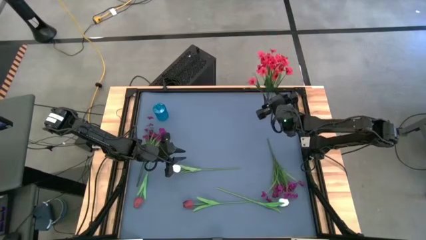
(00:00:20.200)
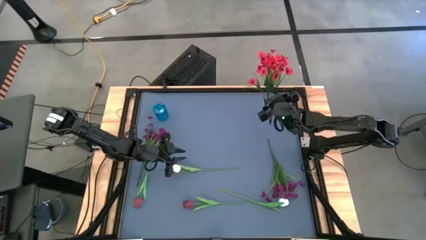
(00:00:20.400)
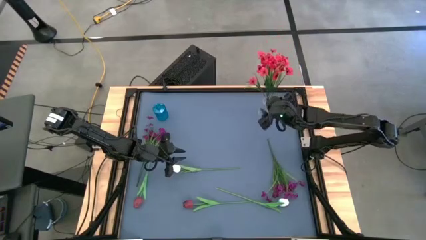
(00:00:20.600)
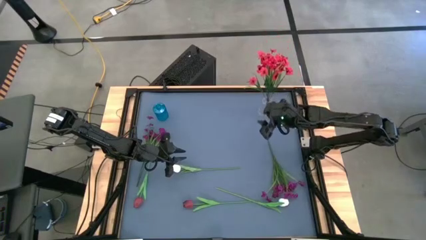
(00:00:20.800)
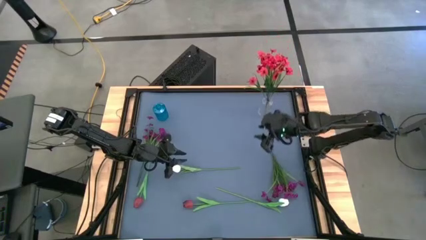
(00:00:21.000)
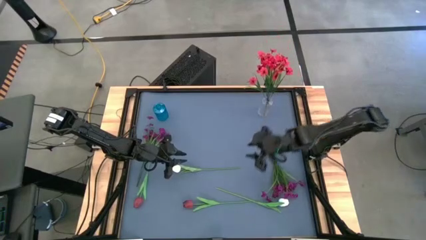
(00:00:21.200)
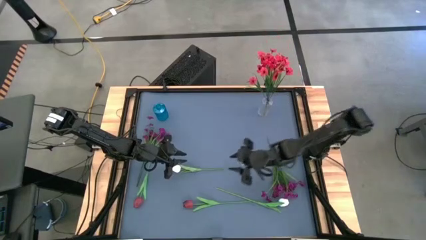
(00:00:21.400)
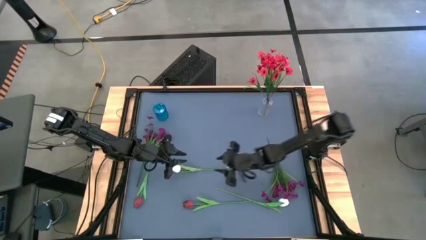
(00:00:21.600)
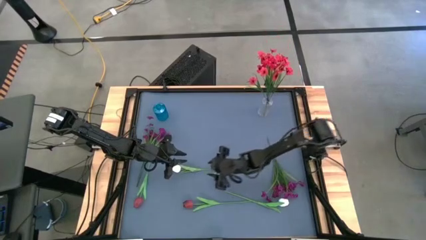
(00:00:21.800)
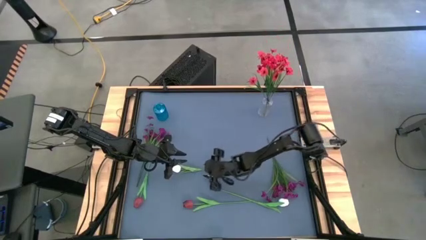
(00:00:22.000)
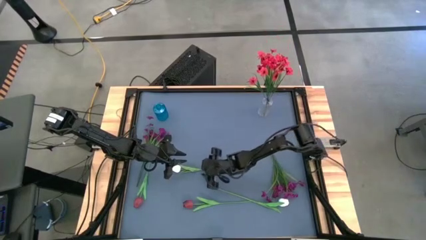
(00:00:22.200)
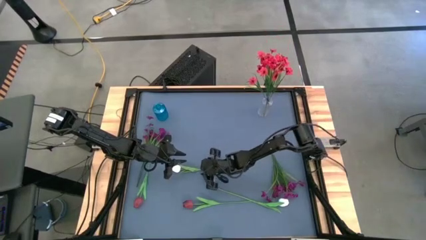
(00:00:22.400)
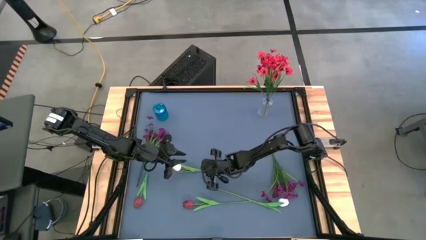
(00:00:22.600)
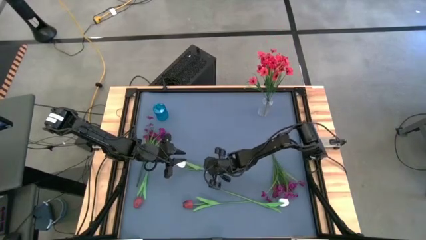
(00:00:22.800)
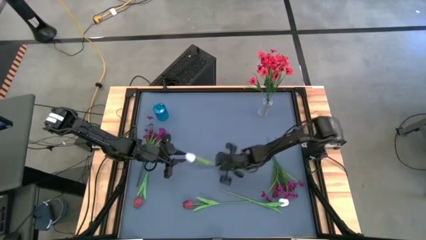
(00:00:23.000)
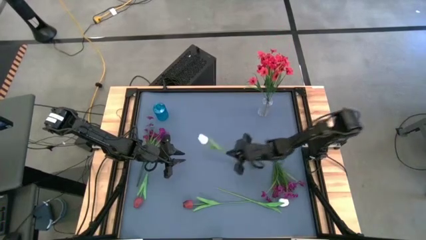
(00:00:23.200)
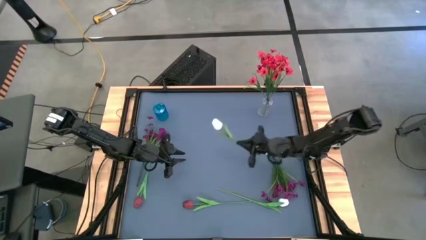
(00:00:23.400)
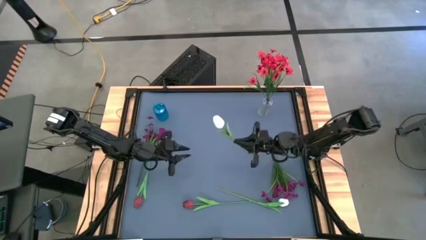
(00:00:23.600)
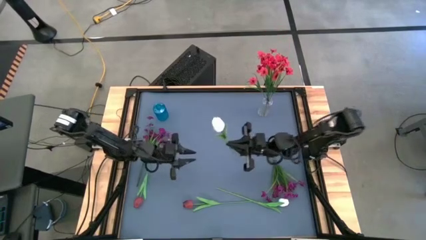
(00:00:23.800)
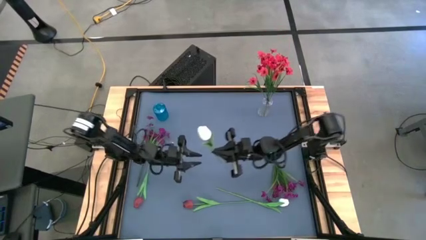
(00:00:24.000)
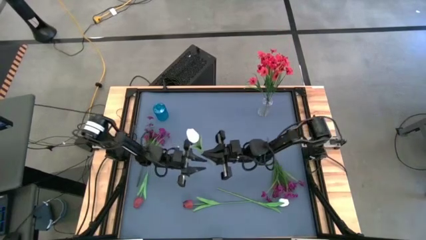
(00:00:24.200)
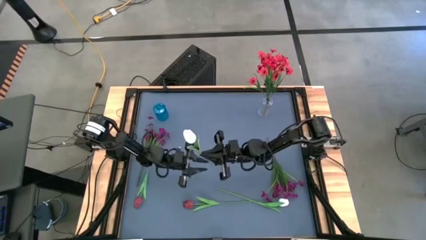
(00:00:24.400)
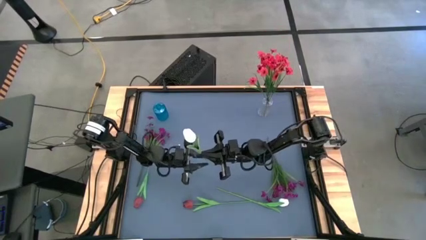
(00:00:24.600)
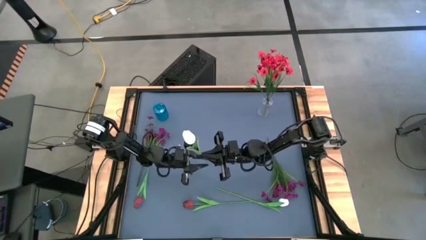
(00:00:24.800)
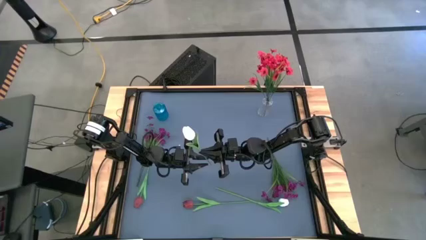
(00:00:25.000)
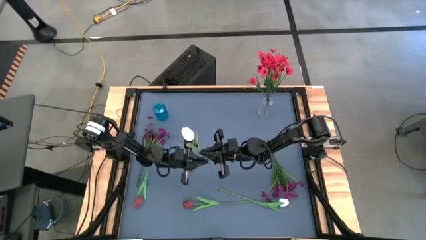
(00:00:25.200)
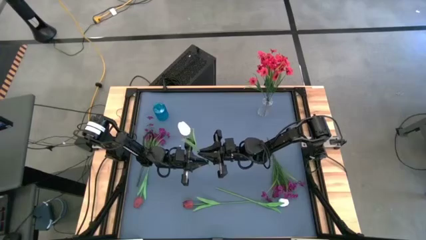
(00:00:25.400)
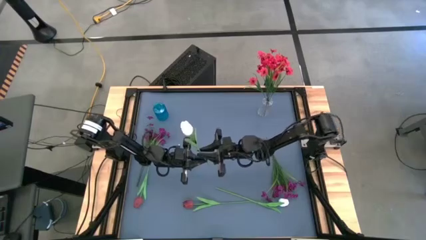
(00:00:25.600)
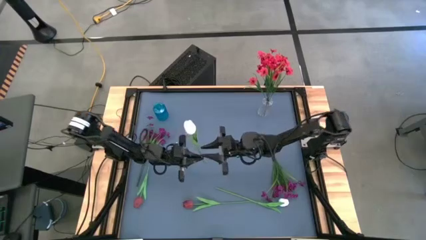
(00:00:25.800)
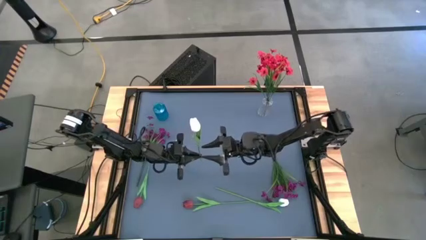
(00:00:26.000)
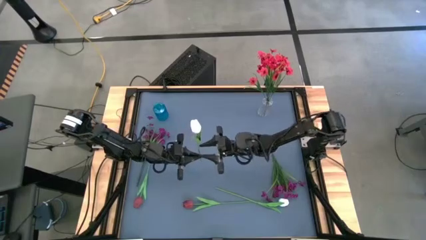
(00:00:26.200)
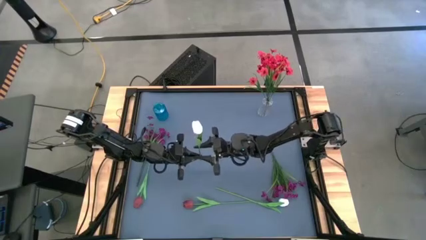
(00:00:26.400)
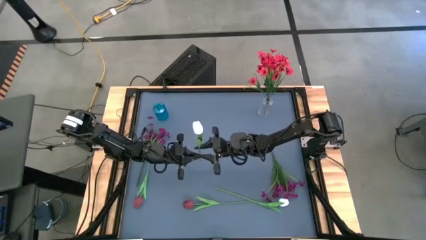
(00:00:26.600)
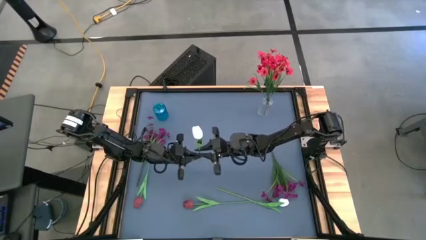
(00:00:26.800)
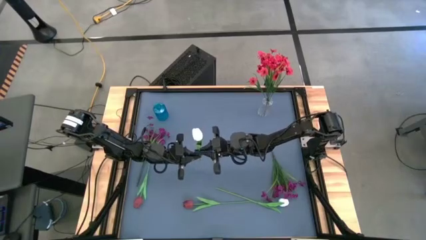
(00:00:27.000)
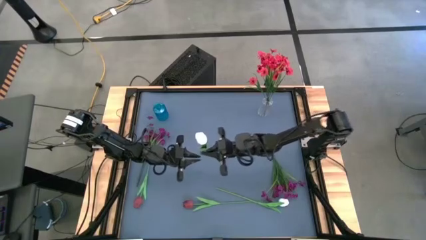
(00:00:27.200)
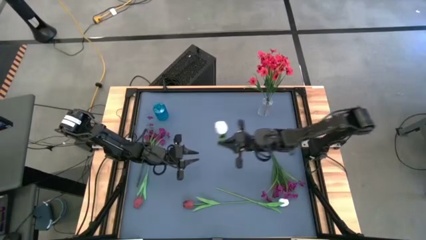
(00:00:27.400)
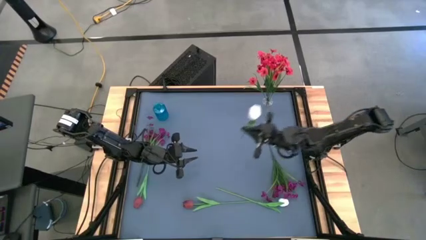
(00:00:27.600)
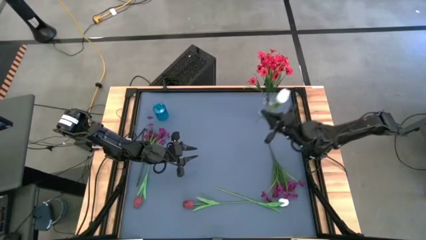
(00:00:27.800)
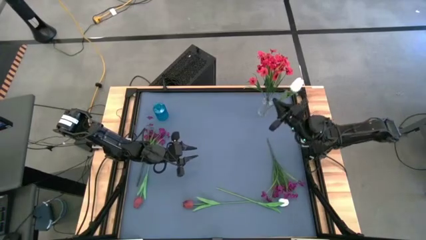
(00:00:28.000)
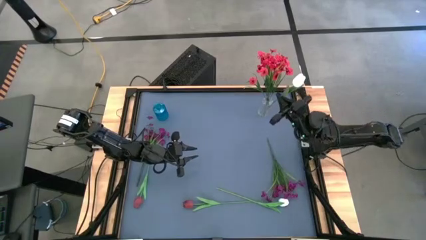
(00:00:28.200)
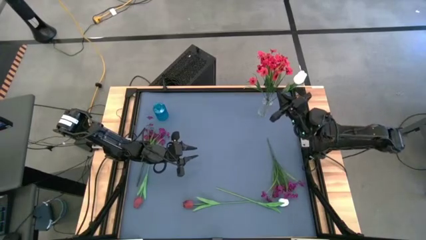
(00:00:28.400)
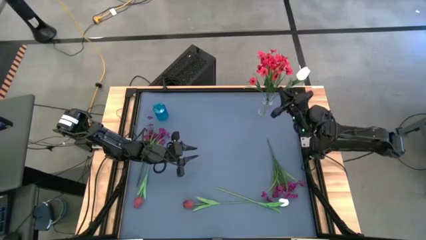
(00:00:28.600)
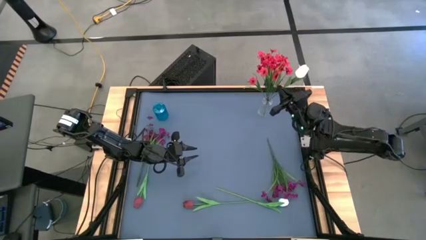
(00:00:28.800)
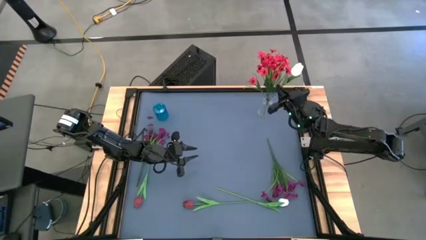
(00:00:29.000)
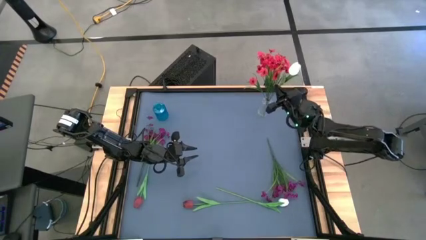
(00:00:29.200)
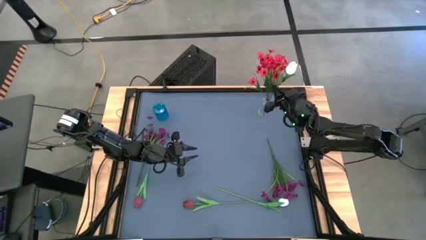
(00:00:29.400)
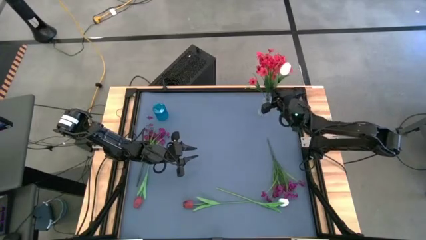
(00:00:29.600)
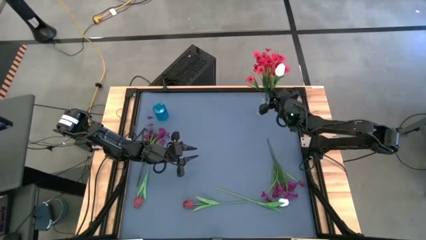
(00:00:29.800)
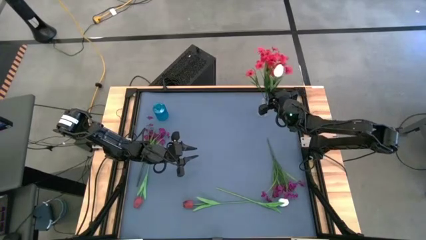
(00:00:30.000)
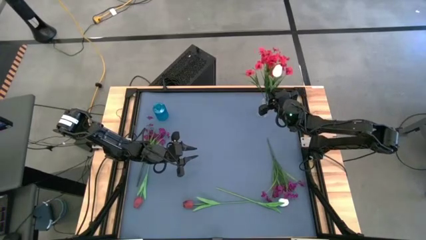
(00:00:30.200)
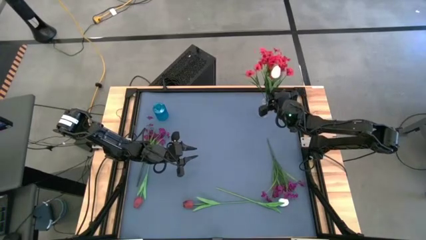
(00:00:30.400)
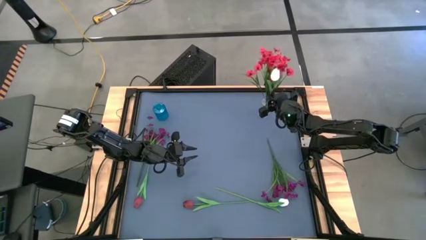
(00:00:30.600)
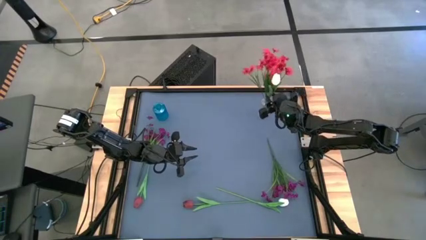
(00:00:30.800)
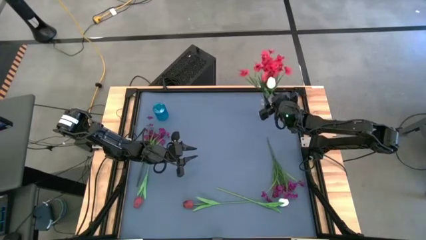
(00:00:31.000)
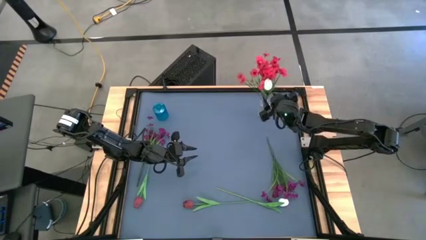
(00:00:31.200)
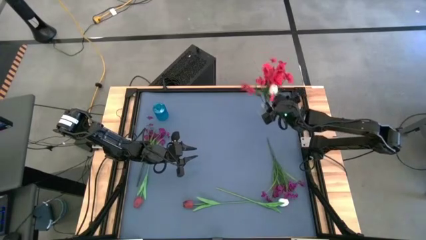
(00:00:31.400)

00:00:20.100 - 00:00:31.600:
Task: Sort flowers into vase by color
Put the top white tulip into the transparent vase

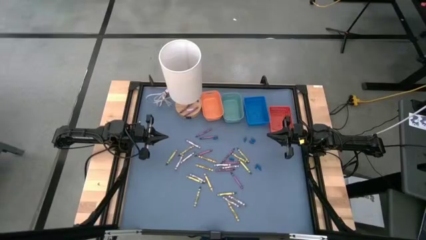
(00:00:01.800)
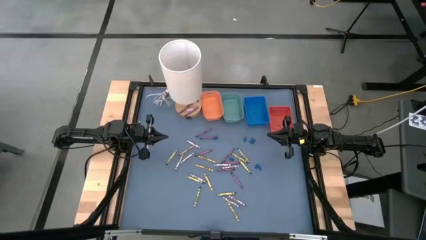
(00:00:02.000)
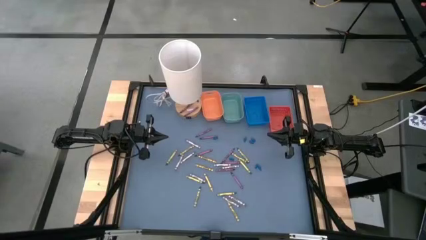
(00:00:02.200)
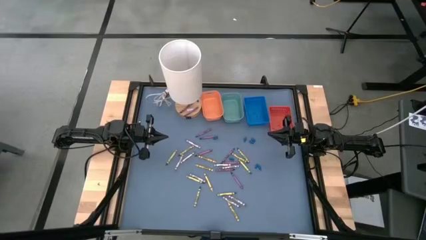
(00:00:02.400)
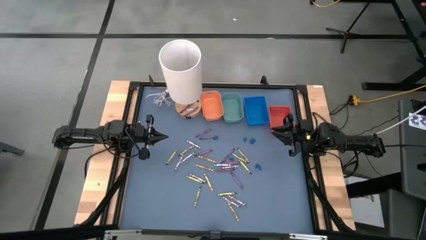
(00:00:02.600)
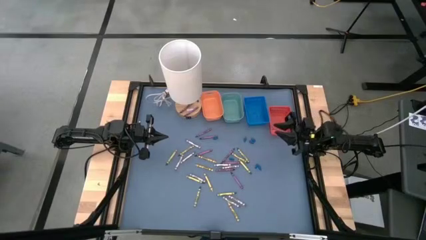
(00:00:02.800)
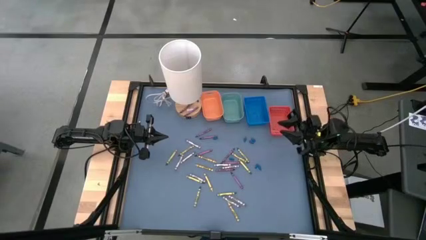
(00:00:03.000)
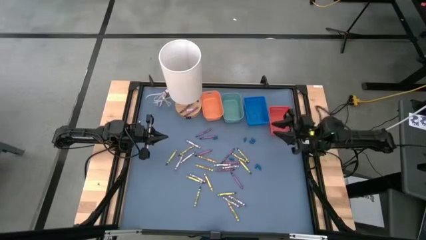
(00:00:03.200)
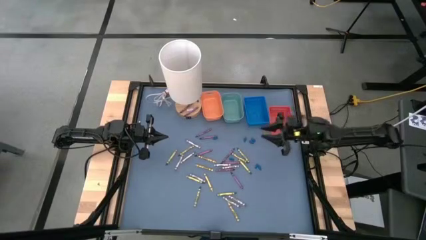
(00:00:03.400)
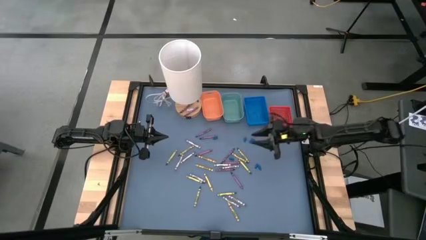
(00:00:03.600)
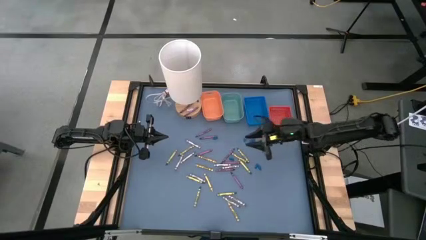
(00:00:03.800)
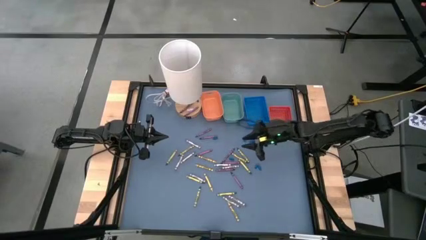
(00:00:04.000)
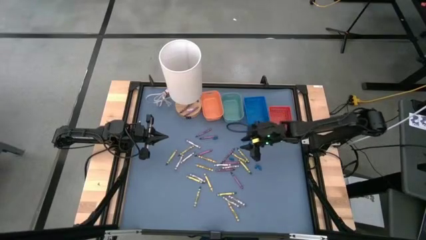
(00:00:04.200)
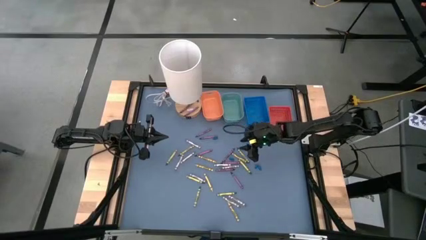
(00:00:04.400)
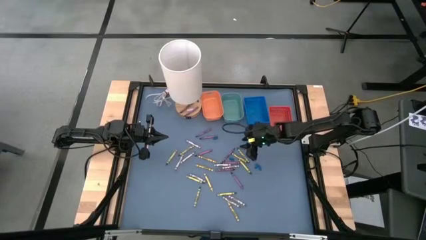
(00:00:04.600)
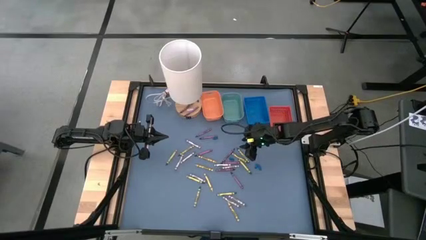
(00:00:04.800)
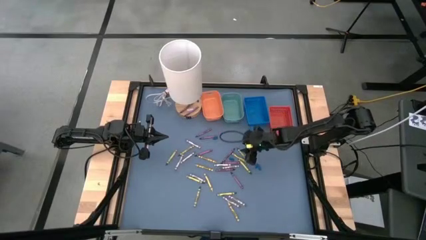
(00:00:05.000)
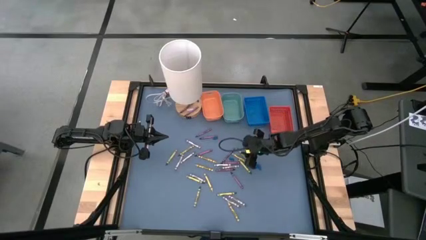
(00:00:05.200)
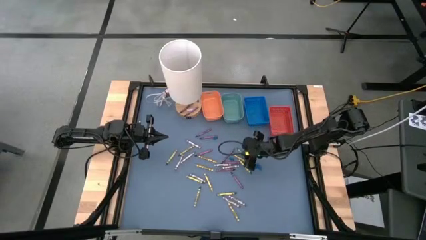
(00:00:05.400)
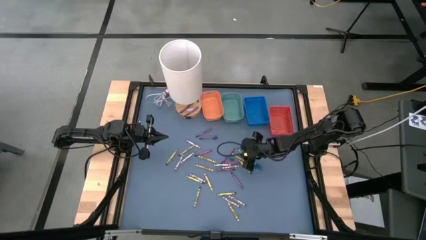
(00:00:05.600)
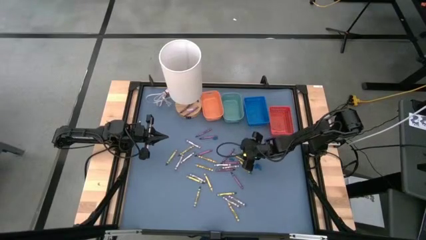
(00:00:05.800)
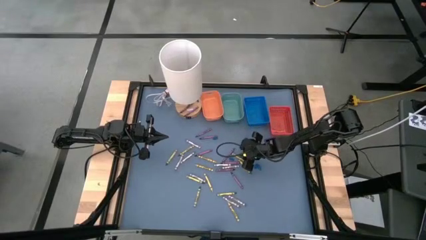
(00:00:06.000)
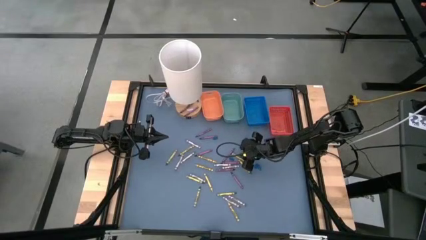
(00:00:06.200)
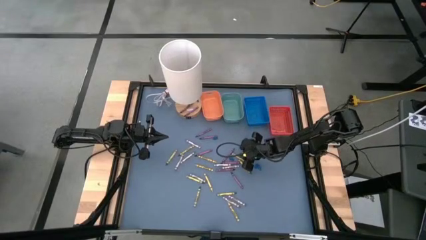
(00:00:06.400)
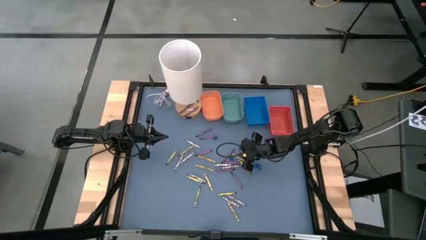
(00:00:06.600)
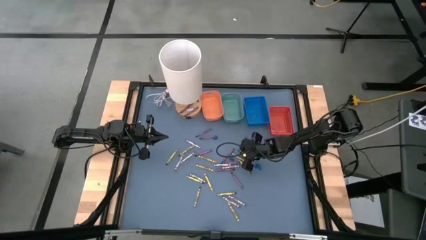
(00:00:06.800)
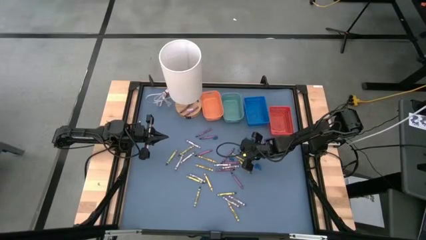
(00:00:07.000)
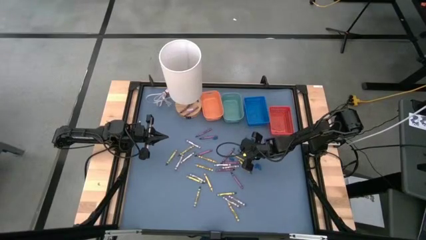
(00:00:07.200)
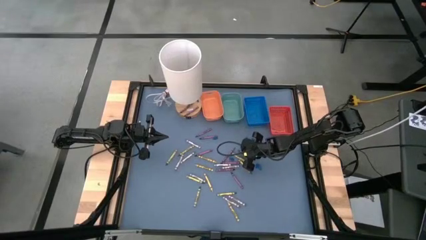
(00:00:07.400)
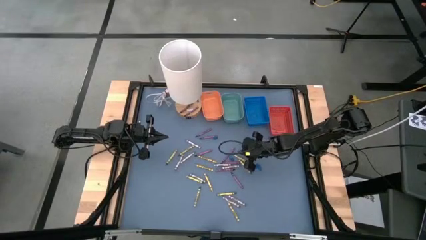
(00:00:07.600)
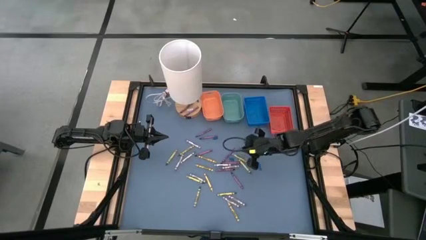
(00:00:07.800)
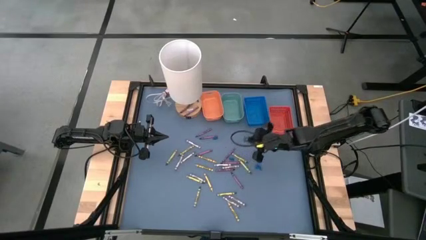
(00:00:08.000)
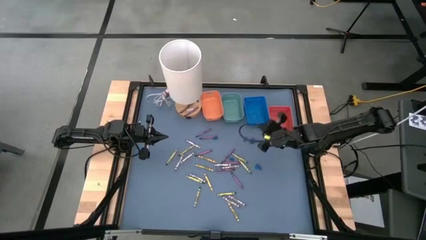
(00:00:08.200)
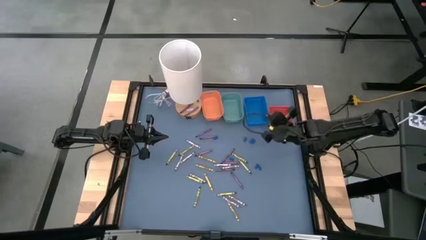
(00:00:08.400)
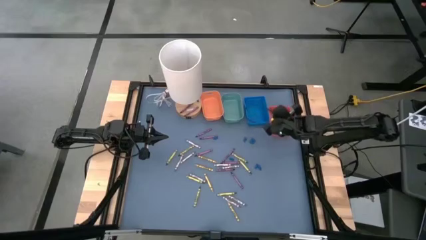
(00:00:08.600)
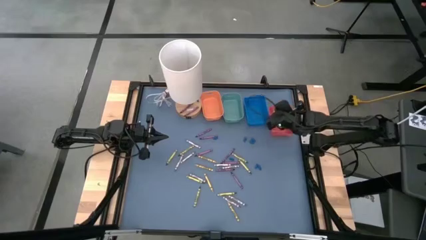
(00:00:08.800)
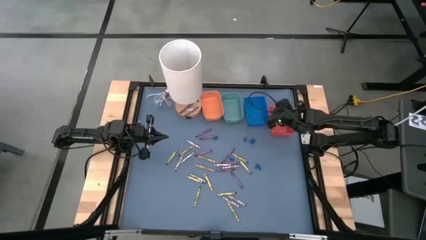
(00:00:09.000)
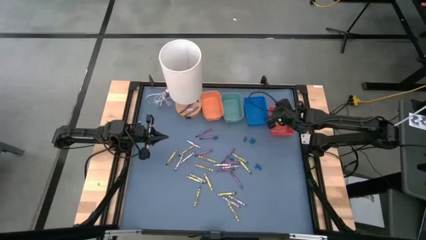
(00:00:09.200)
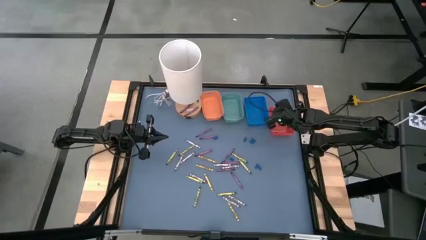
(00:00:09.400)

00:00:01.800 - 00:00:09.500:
Task: Sort crayons
Put the green crayon into the orange bin
